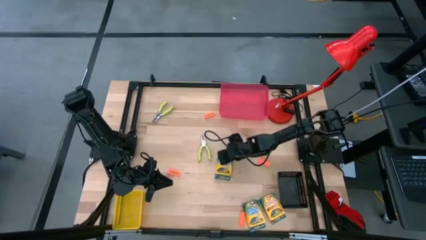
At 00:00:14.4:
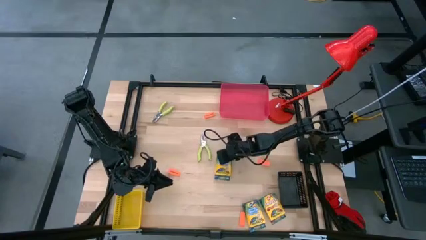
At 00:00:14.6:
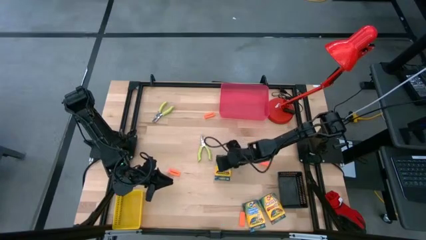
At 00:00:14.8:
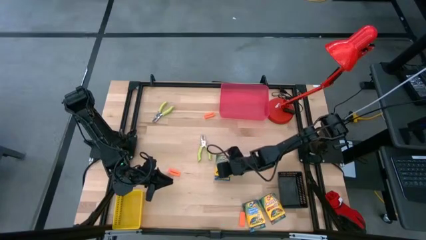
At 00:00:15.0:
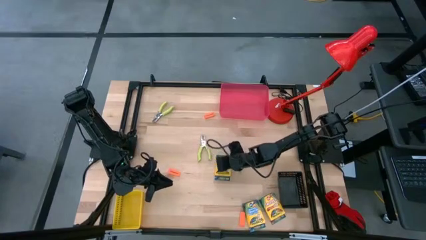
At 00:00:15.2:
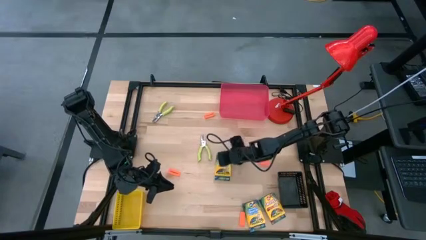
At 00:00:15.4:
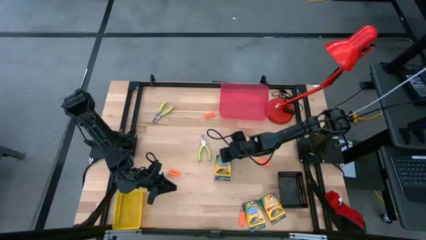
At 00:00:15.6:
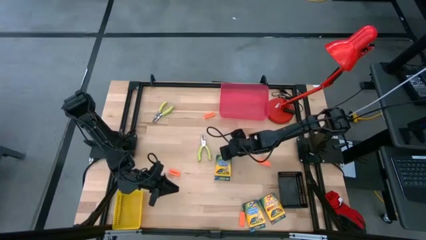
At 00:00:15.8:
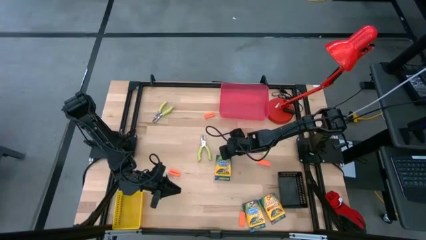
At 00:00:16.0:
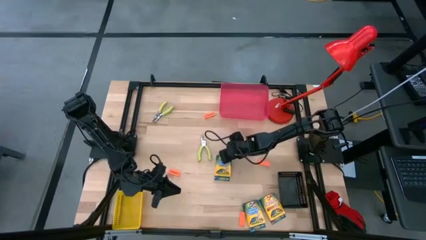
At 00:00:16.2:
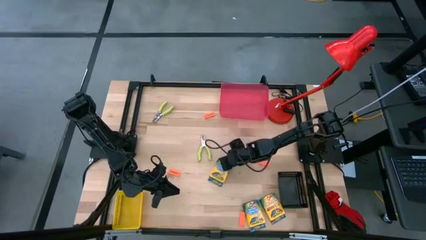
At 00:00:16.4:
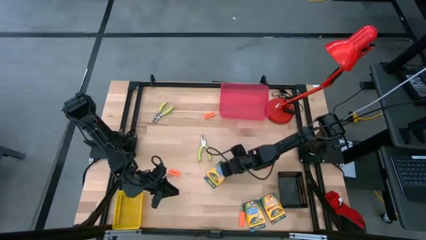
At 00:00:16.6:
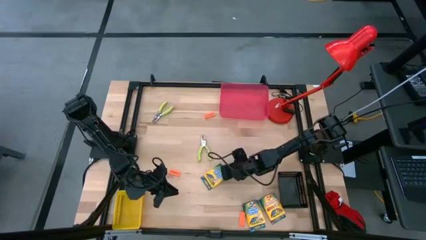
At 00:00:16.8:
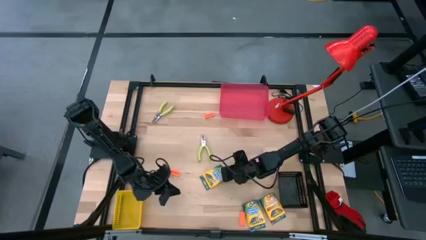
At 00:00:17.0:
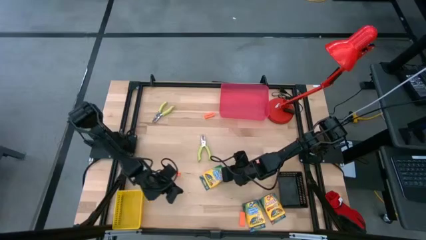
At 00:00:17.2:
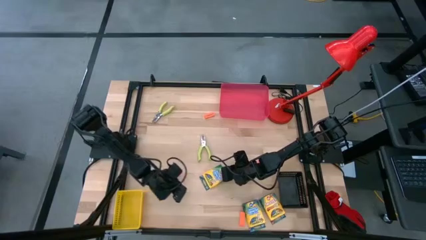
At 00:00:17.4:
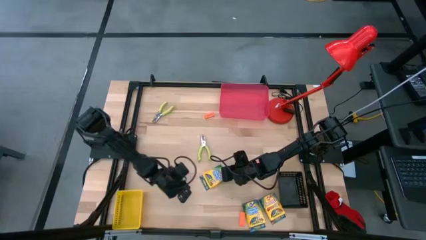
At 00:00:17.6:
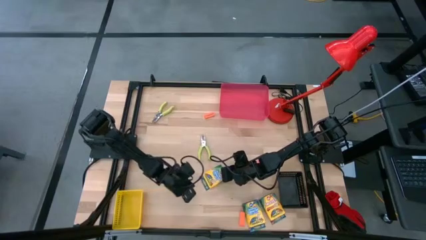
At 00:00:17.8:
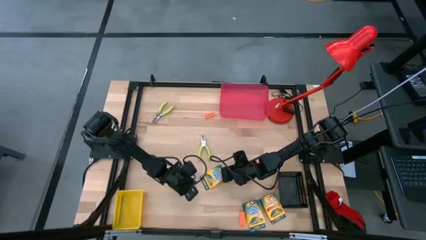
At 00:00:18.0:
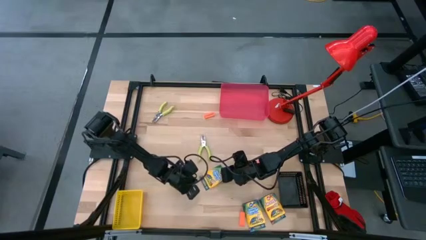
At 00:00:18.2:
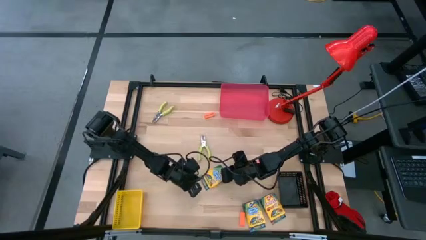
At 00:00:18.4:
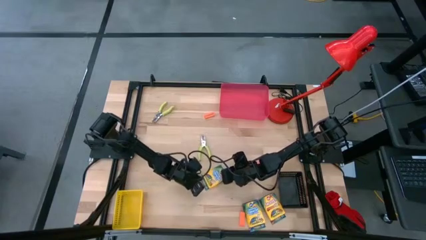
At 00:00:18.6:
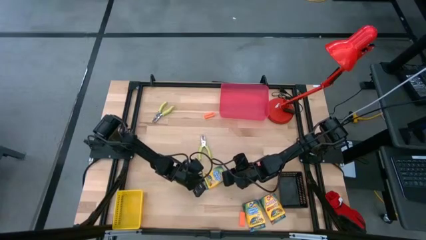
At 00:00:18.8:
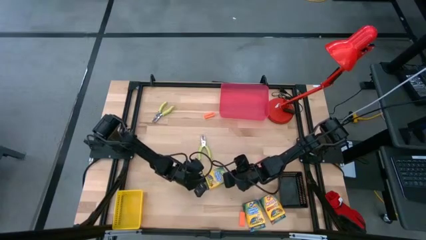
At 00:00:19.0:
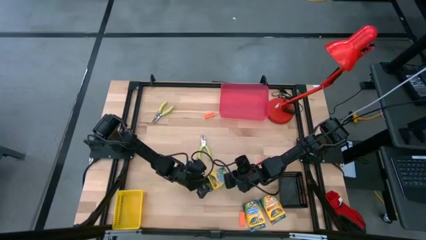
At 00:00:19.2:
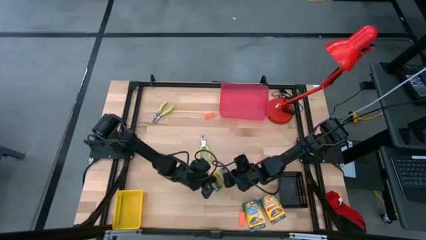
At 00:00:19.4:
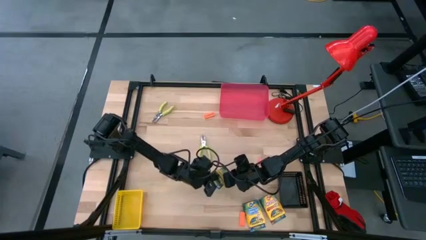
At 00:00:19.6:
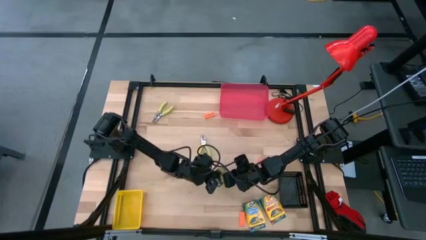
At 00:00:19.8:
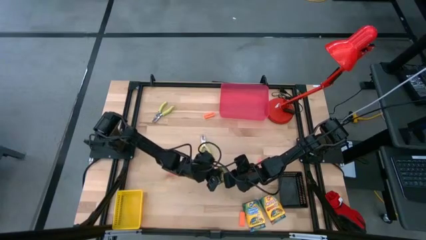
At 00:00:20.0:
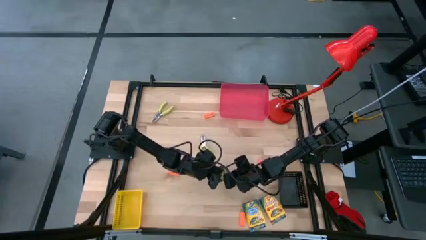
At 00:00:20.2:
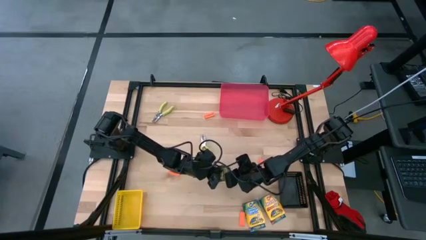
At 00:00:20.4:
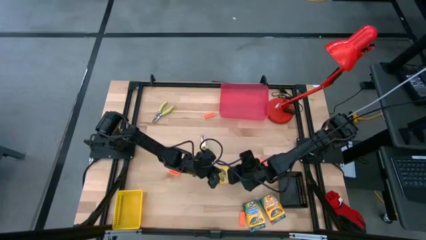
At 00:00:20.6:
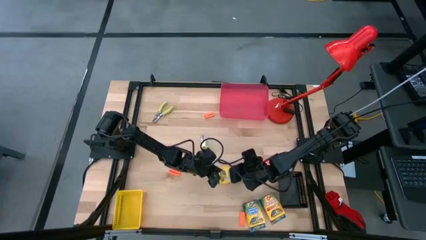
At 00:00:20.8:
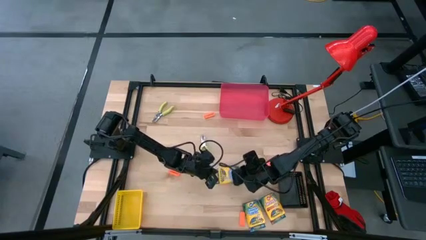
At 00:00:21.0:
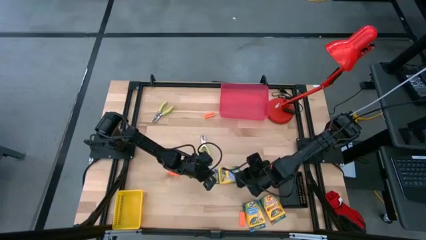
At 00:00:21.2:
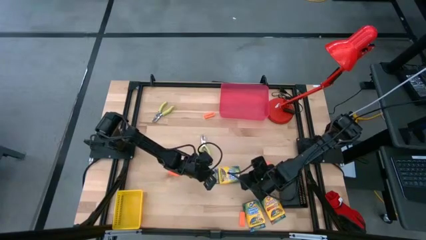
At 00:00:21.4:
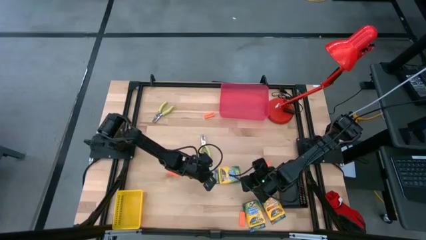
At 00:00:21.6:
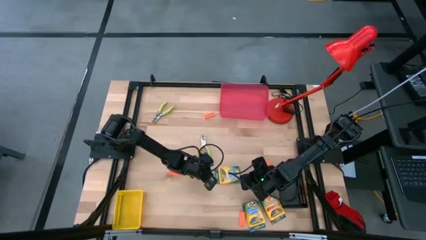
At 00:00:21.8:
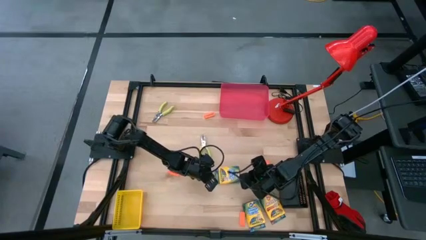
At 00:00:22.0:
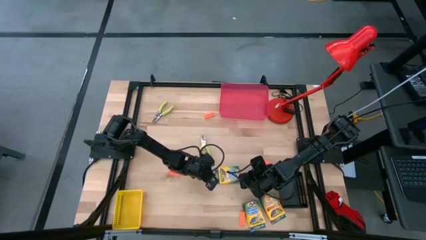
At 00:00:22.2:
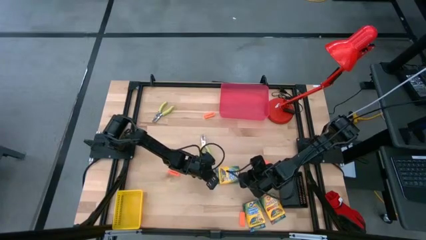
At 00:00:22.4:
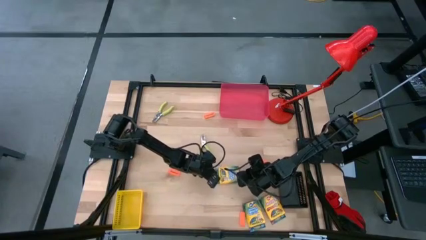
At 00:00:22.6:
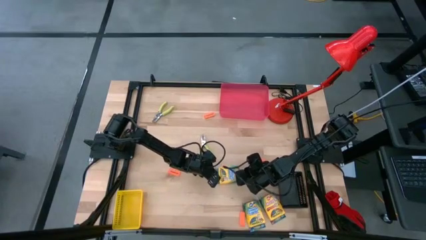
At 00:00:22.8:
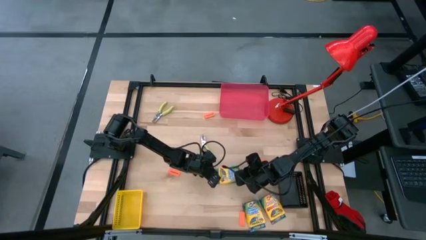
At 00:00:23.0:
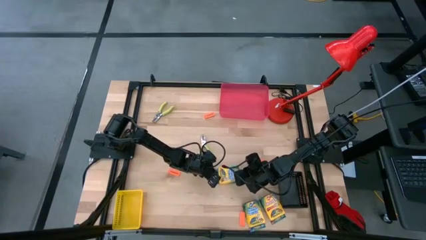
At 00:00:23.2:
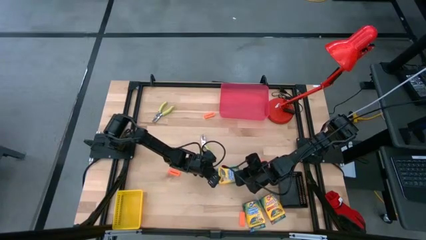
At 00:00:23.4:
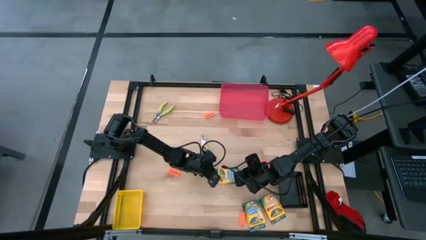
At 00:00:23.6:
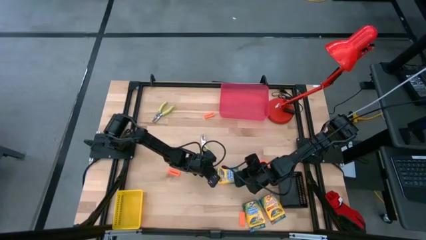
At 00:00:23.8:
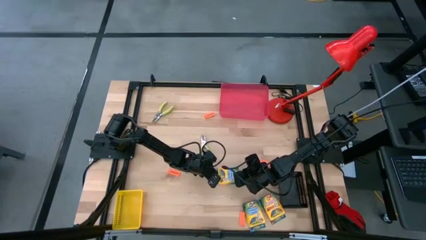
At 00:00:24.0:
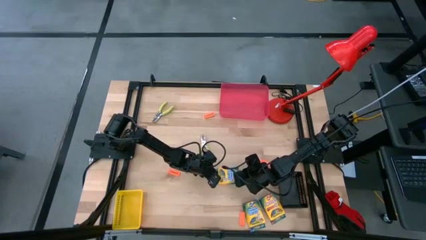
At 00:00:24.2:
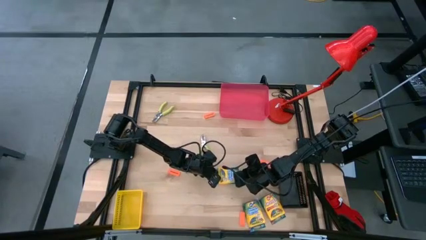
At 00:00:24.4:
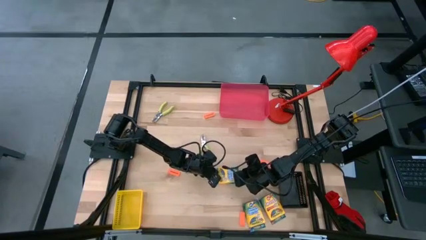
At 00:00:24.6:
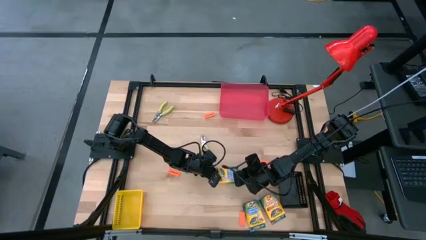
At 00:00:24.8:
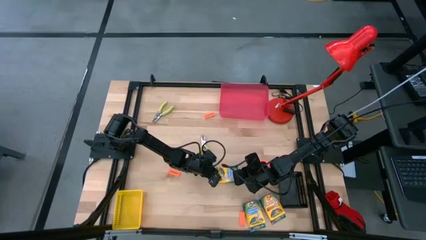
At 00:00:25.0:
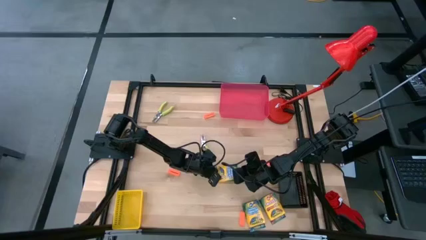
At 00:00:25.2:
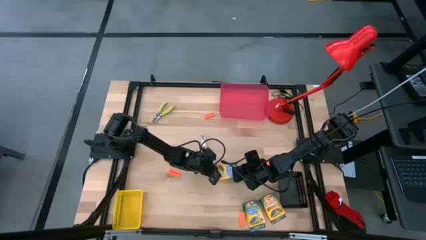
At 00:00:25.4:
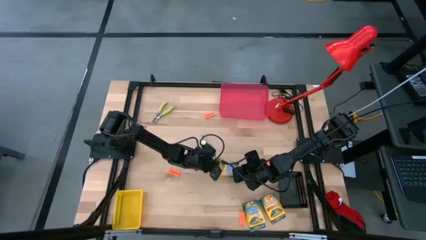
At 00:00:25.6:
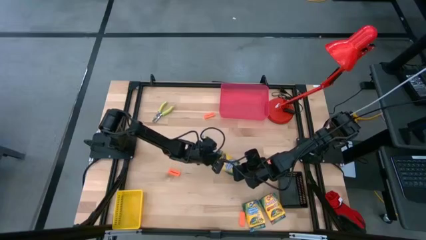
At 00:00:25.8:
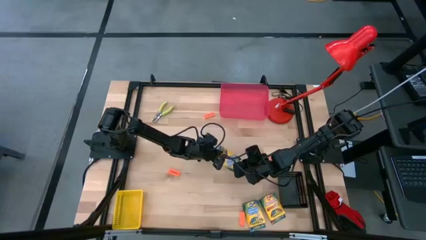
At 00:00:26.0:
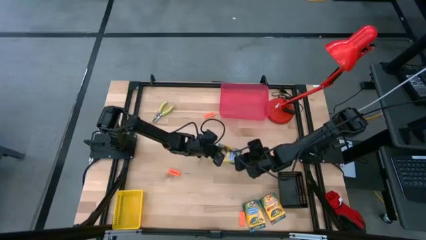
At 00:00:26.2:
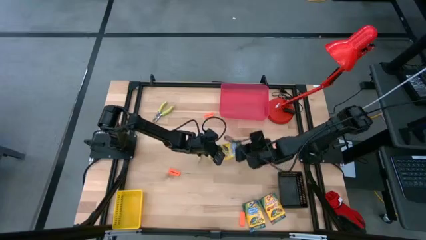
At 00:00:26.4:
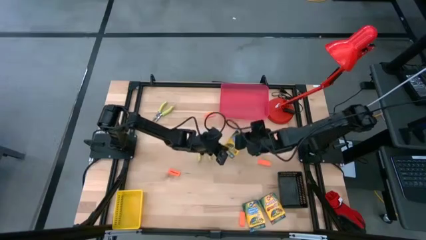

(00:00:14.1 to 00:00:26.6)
Task: Pick & Place School Supplies
Put the yellow crayon box into the red bin
